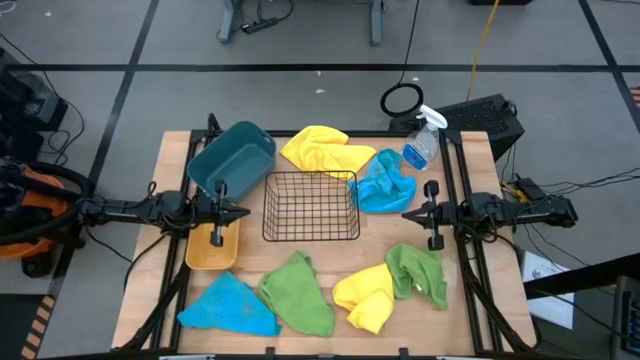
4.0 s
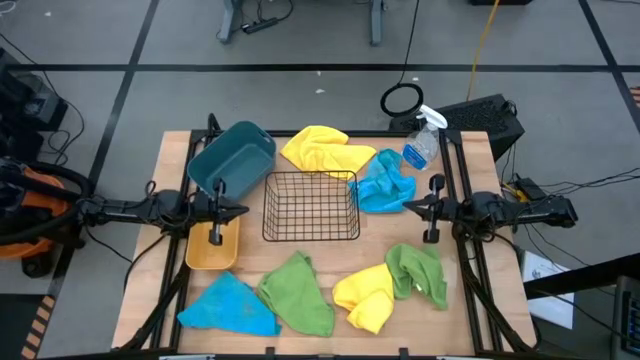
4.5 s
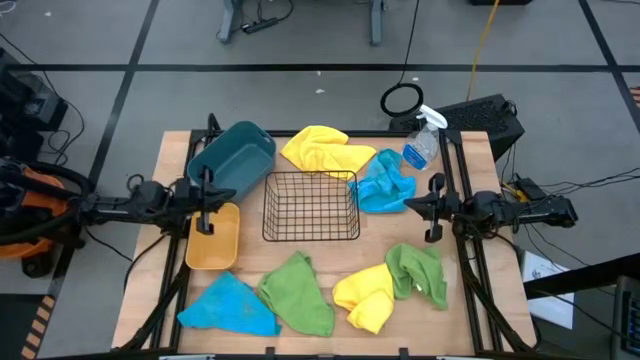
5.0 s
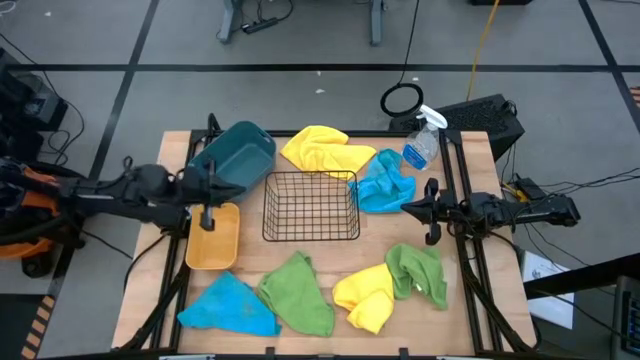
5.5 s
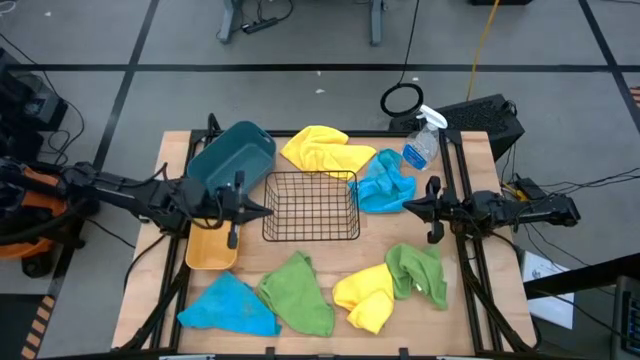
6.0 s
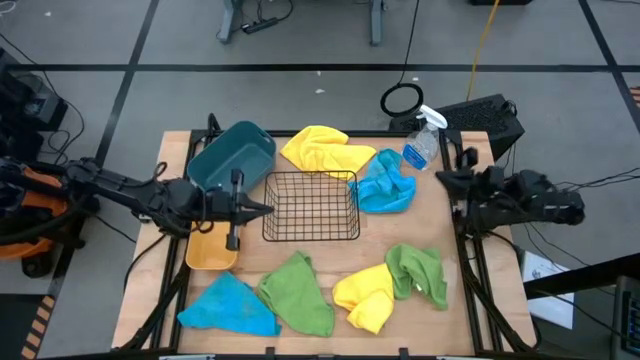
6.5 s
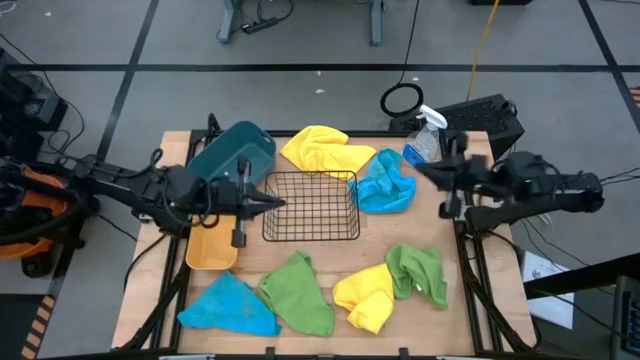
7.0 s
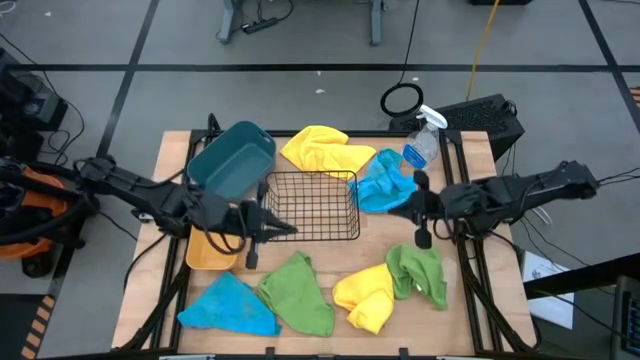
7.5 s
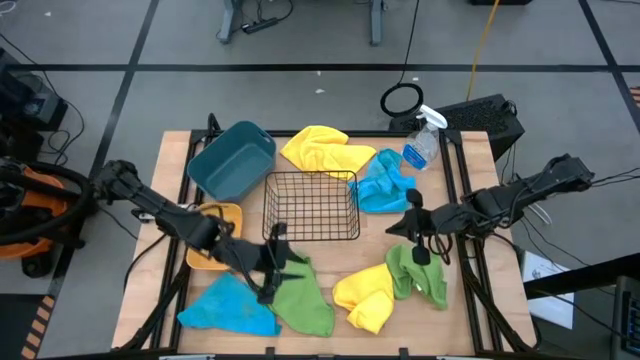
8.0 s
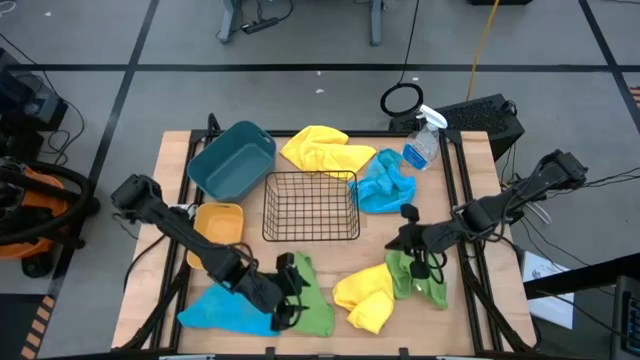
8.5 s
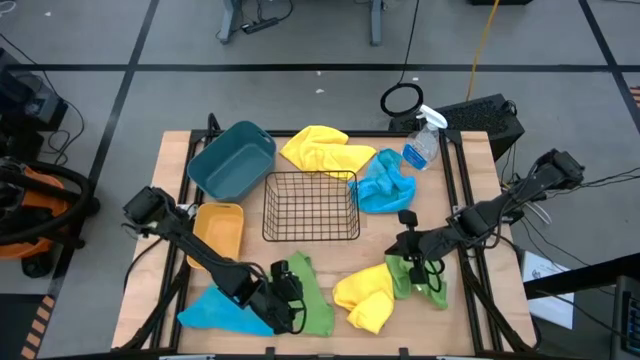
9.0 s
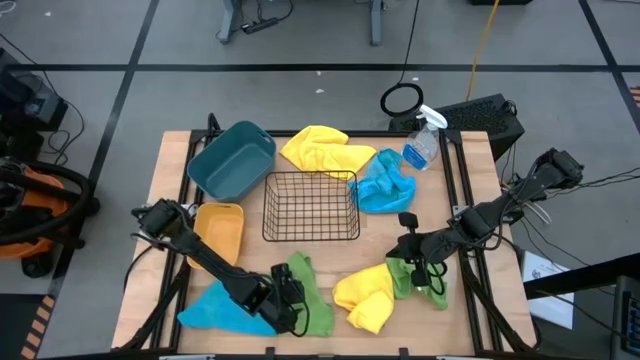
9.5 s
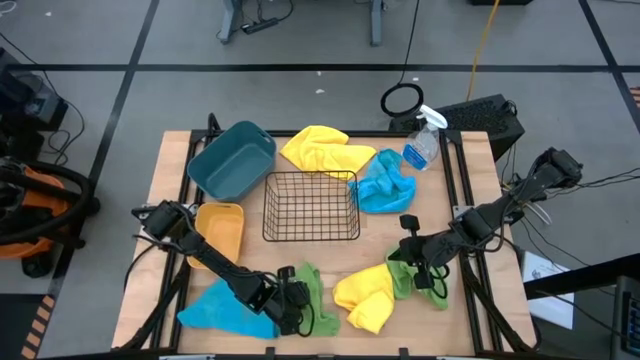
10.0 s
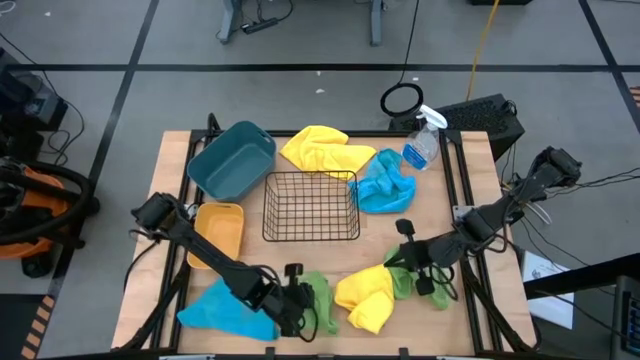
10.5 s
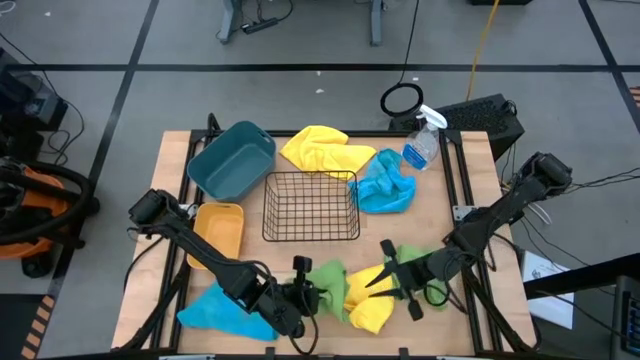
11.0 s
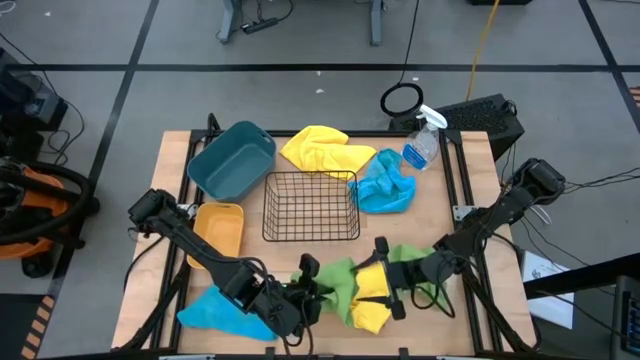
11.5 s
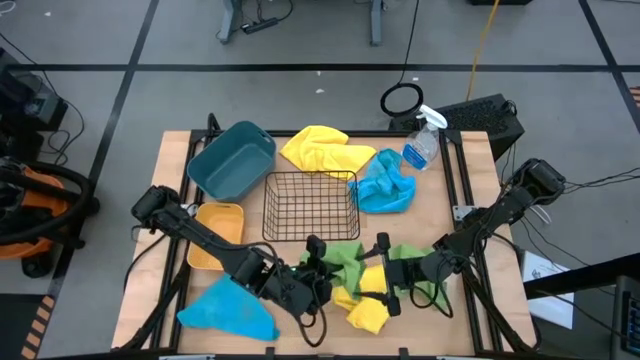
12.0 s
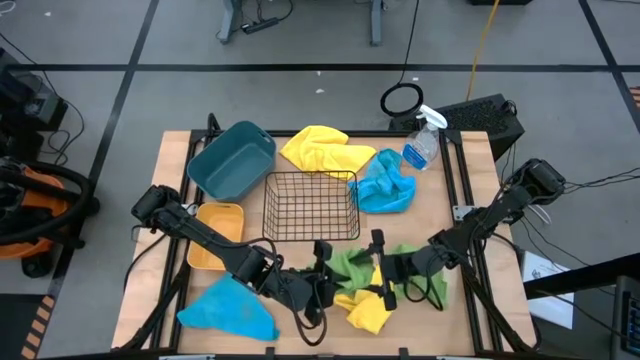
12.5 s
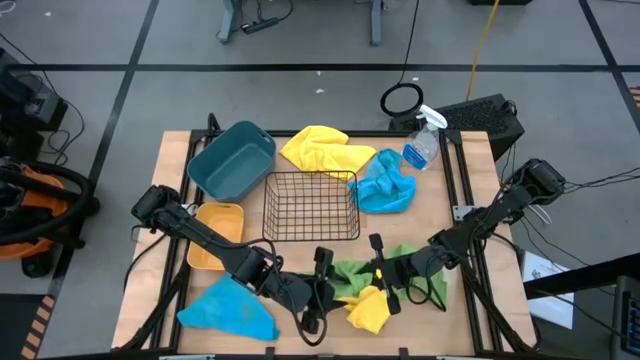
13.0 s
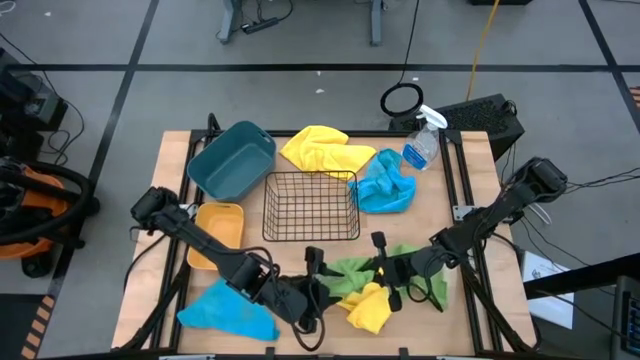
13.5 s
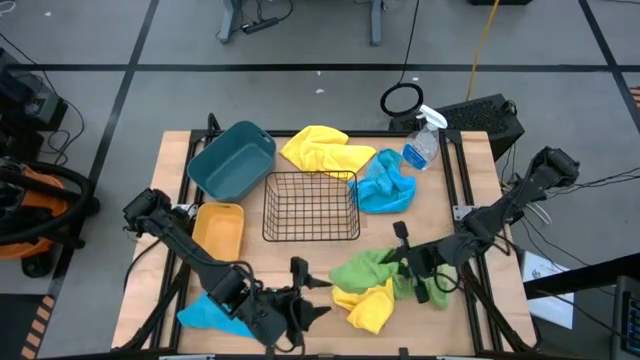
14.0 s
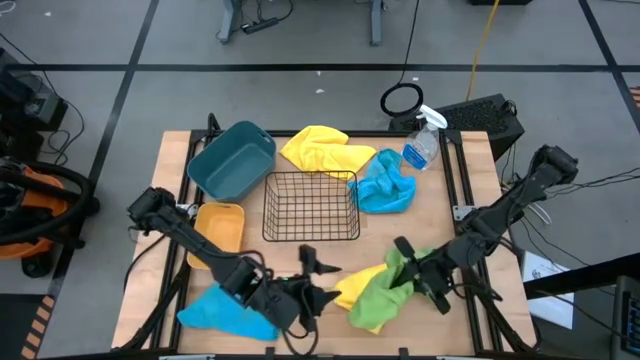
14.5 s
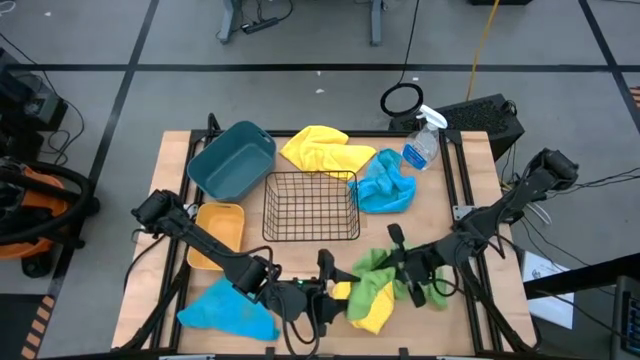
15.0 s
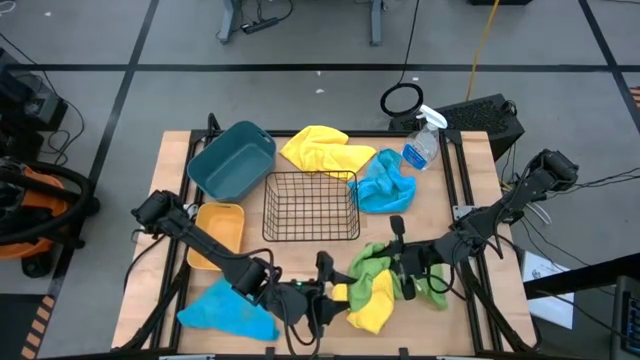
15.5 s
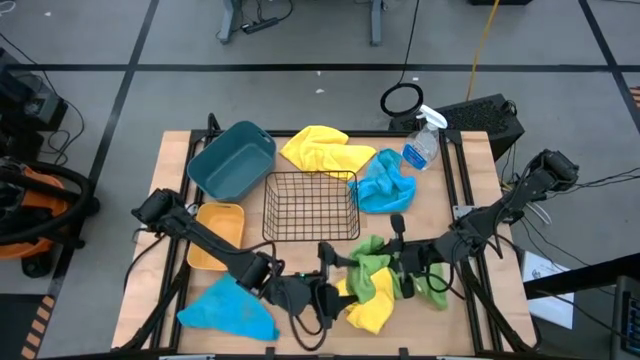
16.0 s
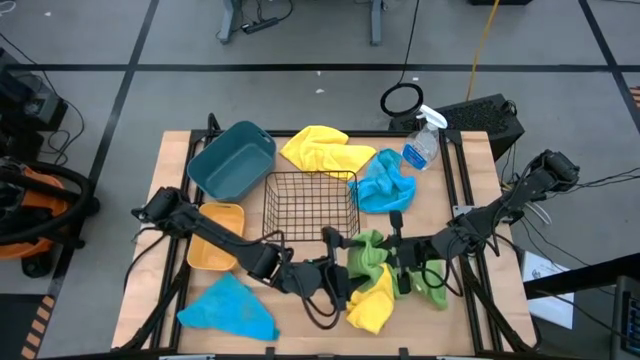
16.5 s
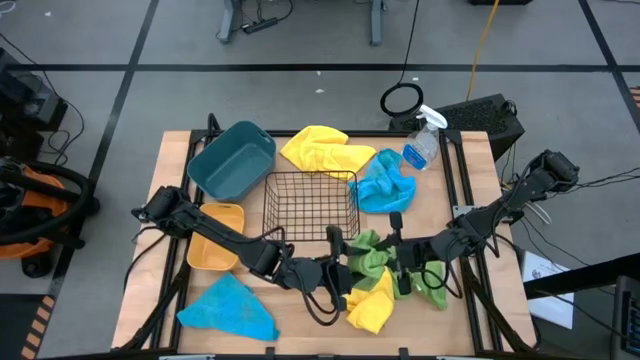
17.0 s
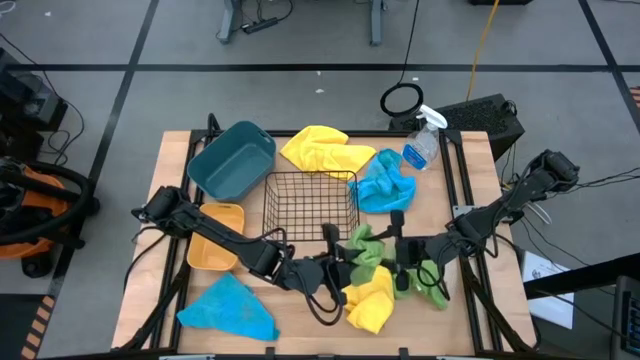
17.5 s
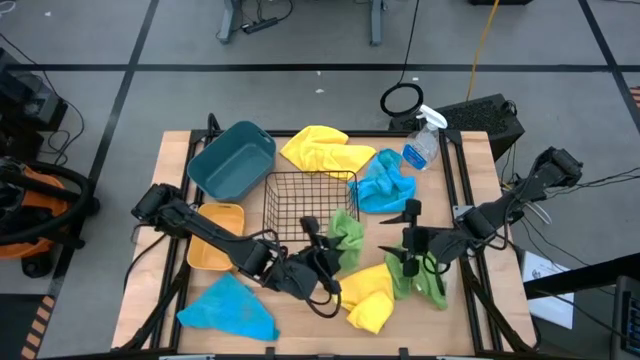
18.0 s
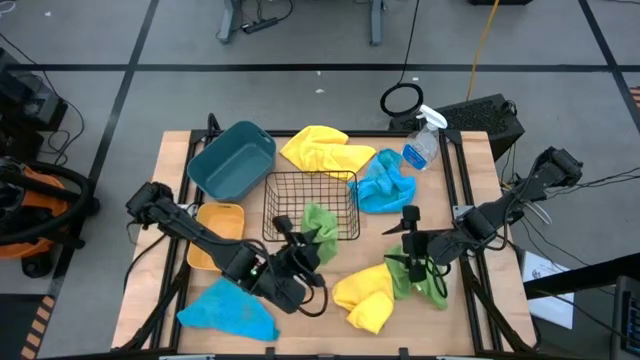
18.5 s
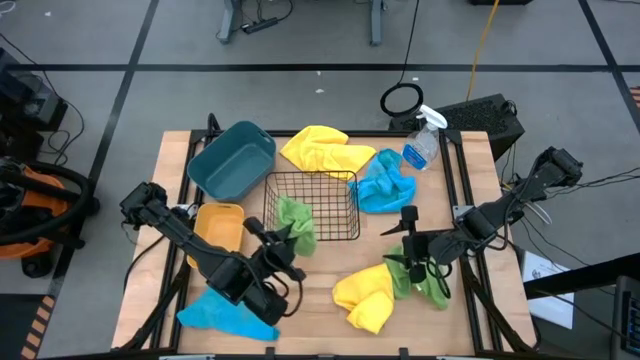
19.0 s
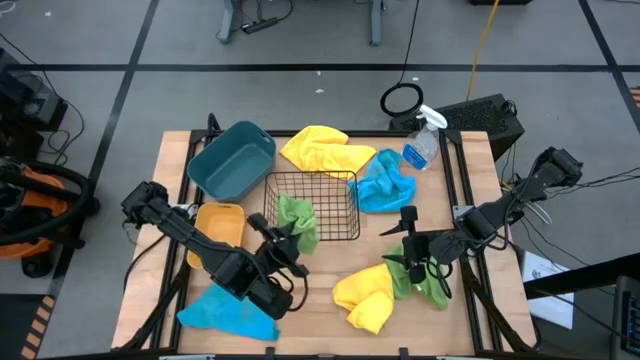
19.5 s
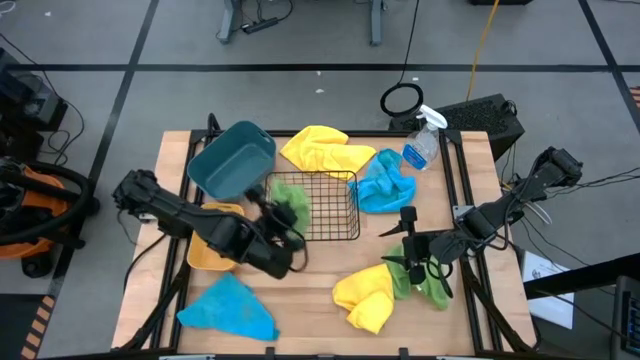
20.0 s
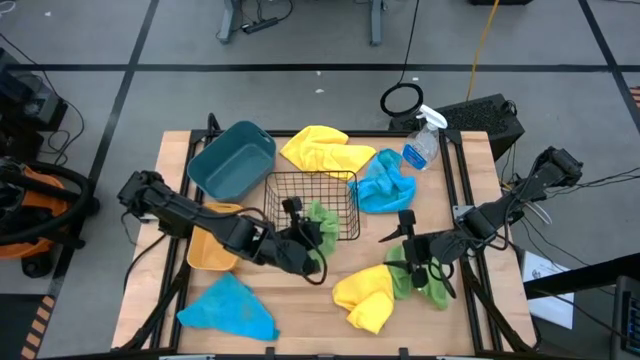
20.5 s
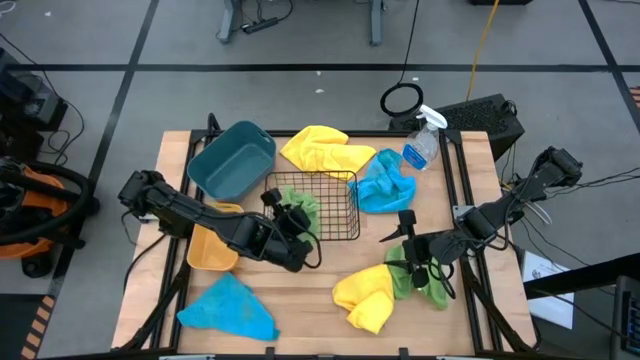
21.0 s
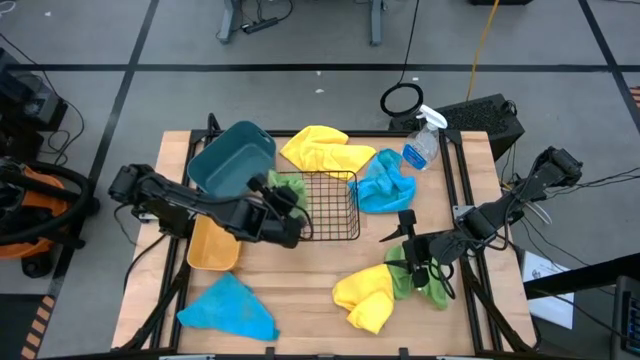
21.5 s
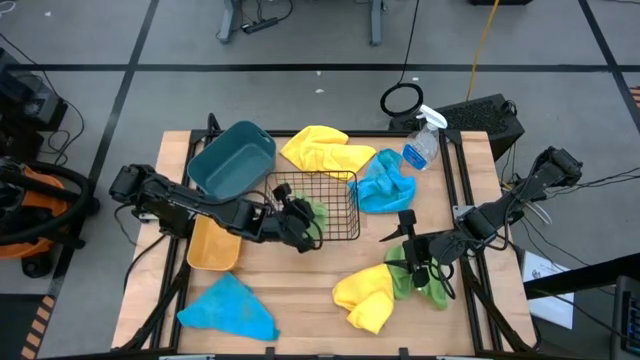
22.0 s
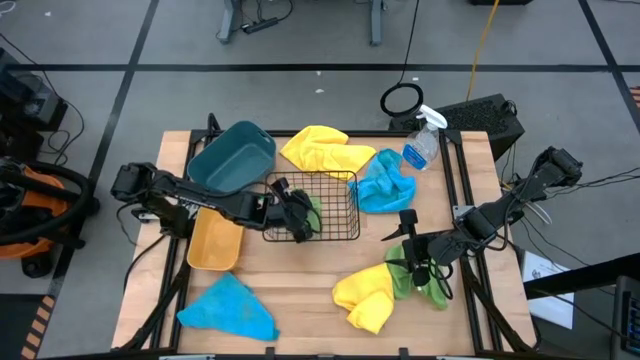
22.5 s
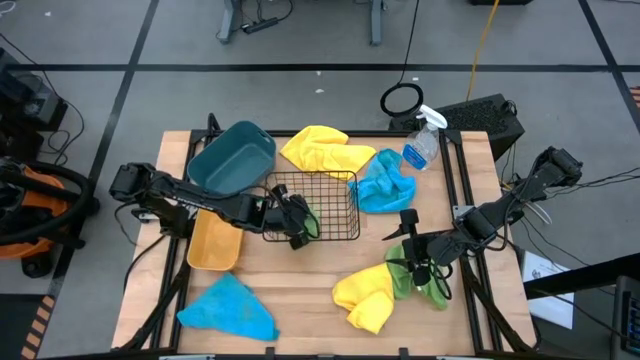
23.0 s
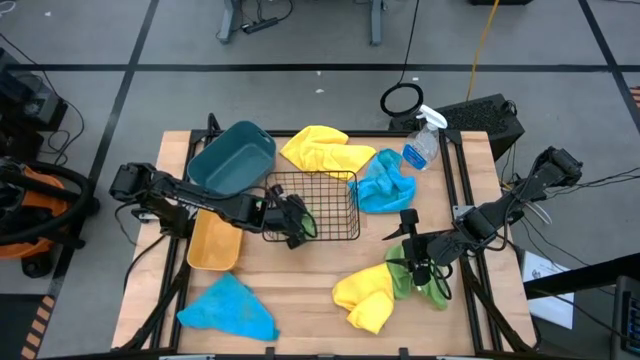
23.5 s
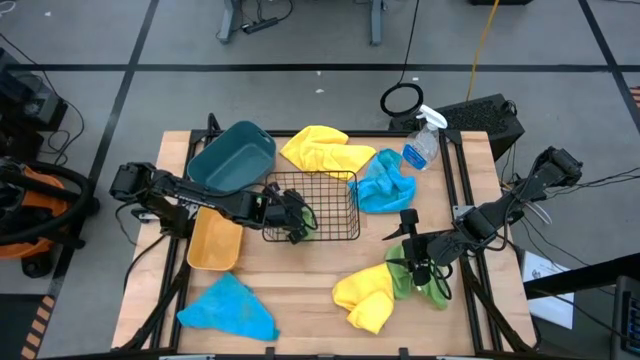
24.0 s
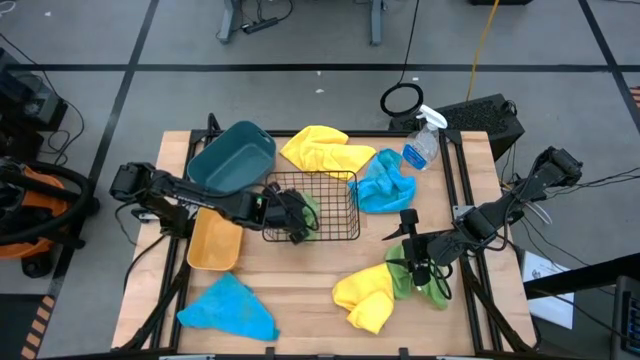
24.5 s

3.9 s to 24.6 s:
Task: Sort microfiber towel by color & place in baskets
Put the left green microfiber towel into the black wire basket
